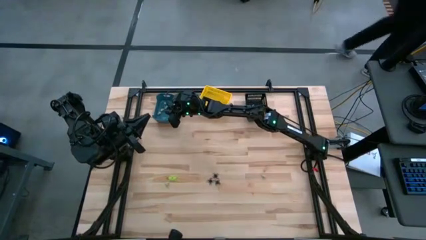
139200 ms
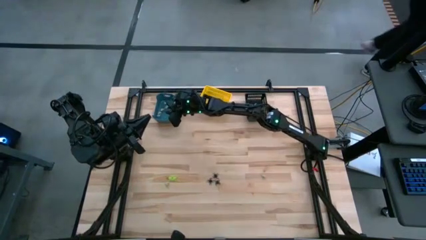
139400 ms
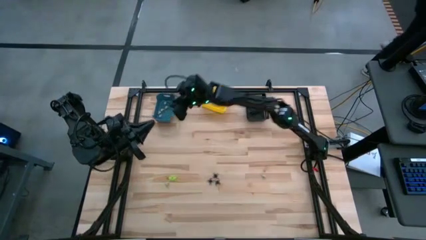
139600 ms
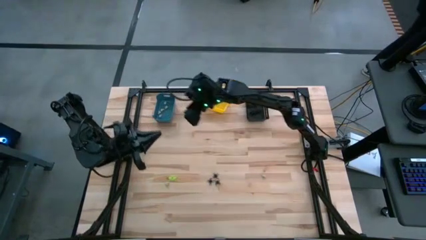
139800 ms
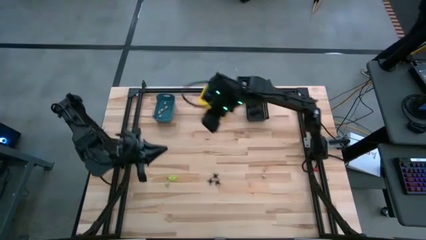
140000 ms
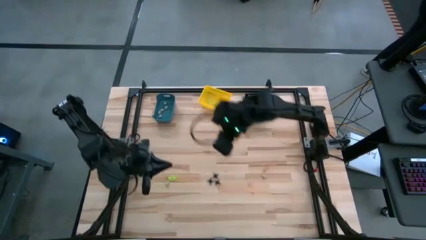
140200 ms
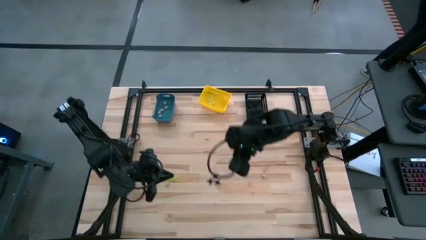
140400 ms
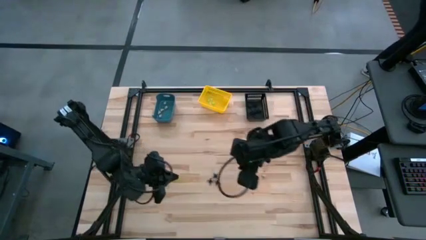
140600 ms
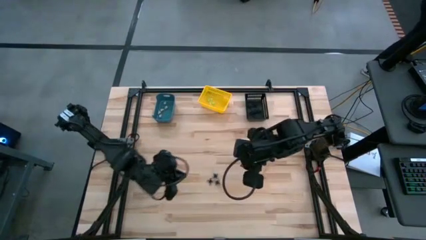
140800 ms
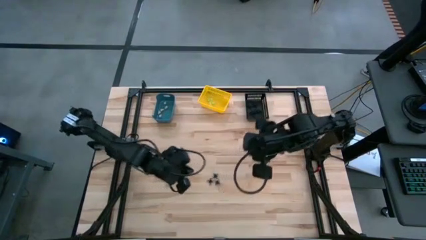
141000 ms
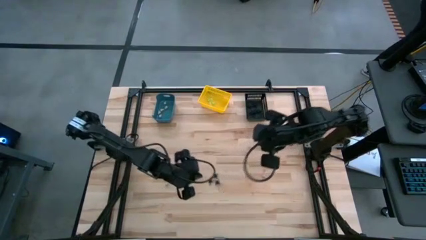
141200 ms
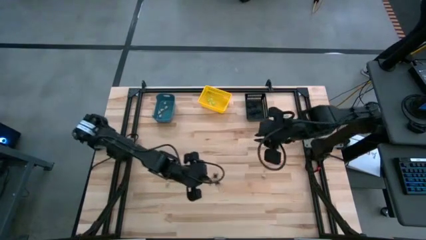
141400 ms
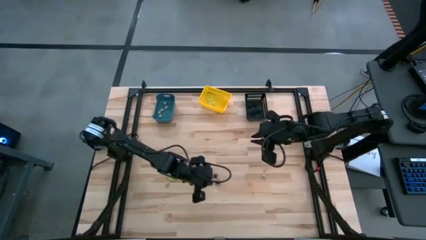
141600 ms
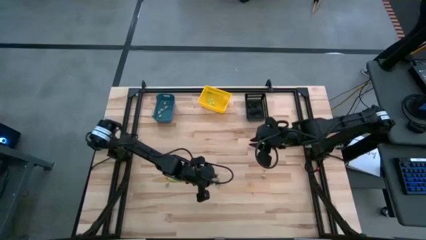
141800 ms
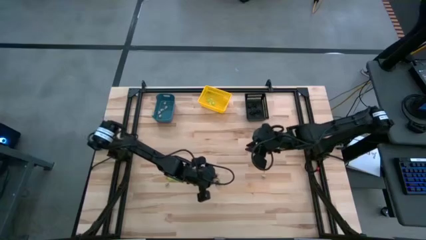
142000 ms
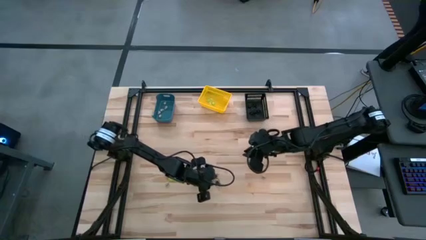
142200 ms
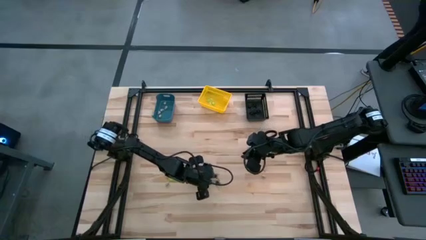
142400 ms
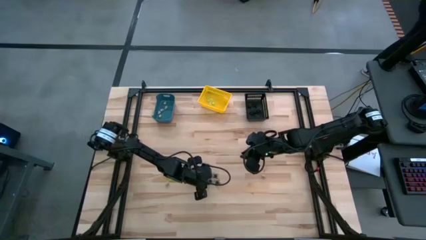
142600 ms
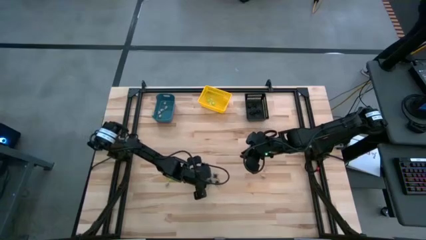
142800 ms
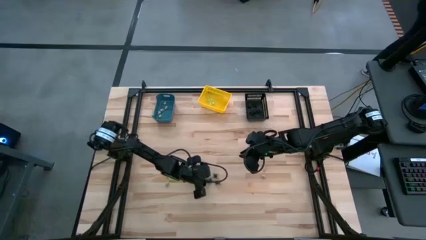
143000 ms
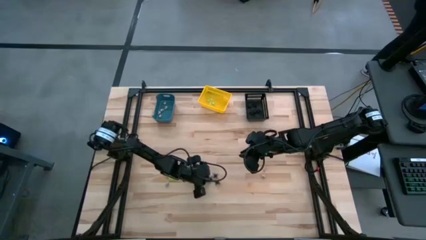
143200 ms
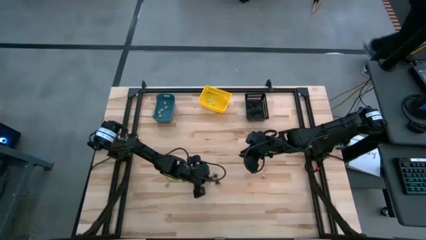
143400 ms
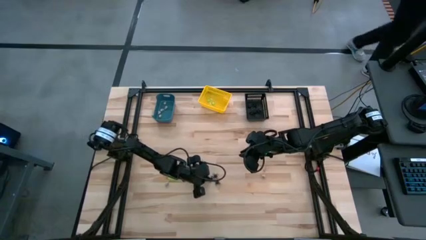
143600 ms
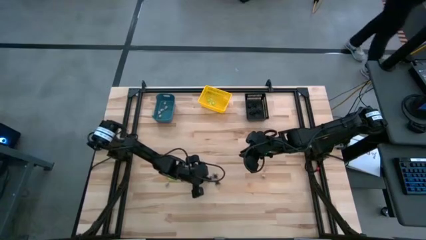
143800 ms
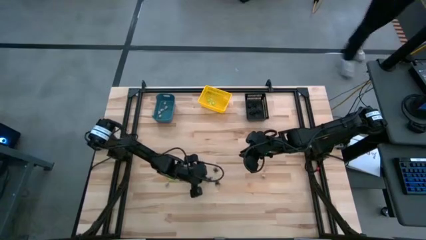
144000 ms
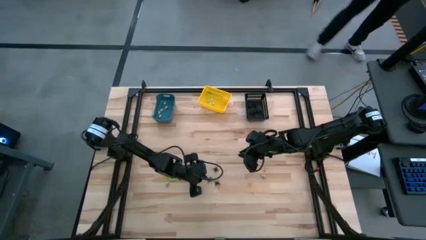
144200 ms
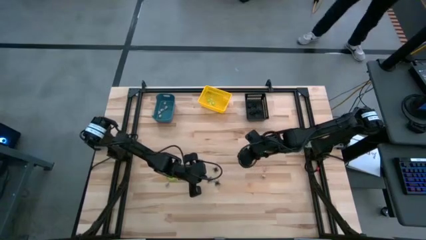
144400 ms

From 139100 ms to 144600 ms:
Task: Sort Halloween decoration
Put the black spider toy into the black bin

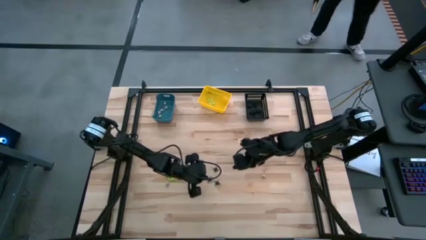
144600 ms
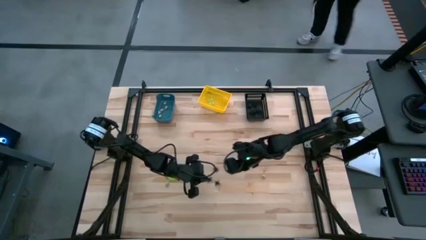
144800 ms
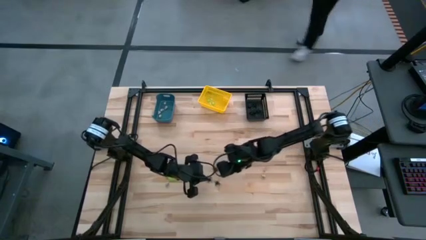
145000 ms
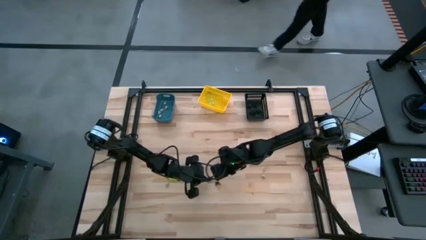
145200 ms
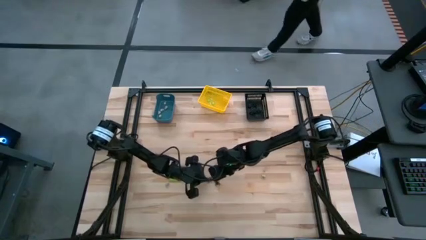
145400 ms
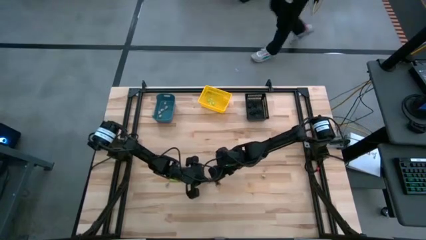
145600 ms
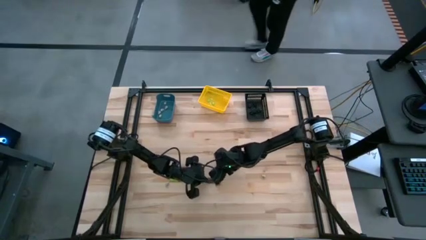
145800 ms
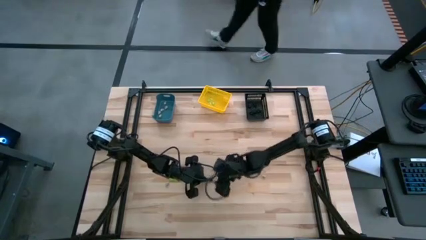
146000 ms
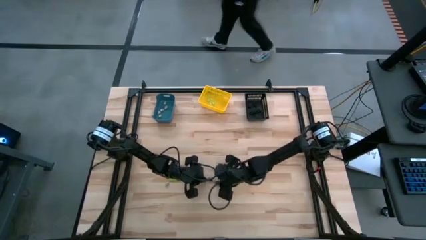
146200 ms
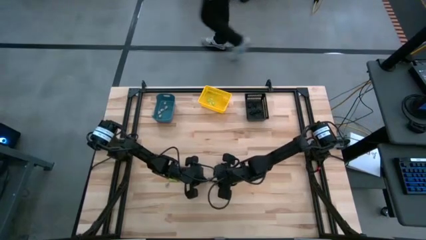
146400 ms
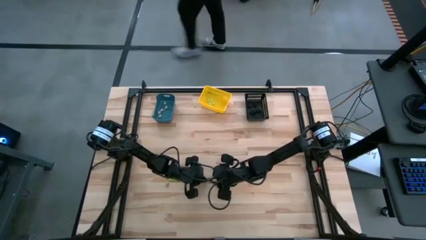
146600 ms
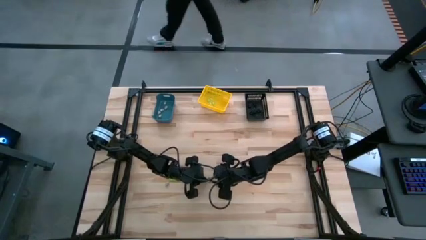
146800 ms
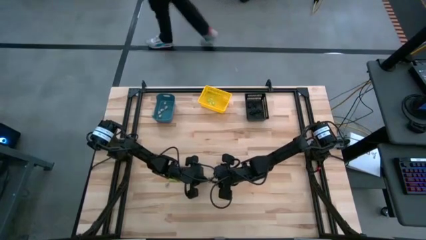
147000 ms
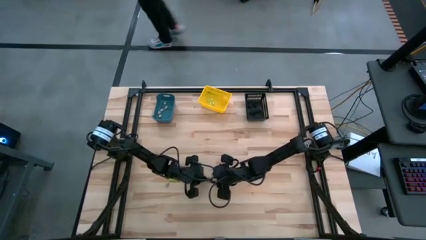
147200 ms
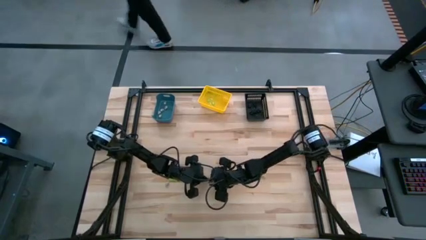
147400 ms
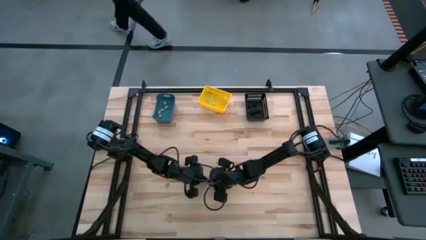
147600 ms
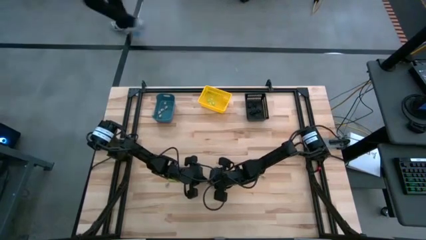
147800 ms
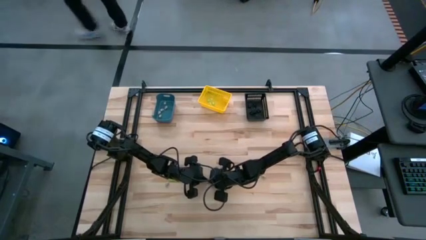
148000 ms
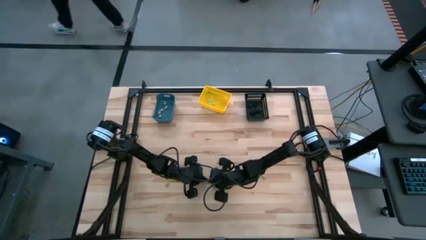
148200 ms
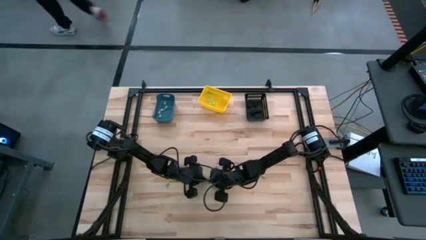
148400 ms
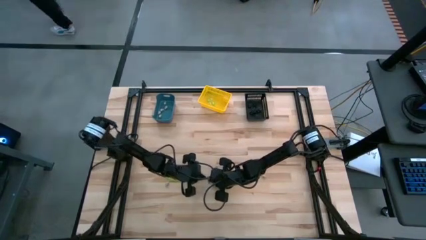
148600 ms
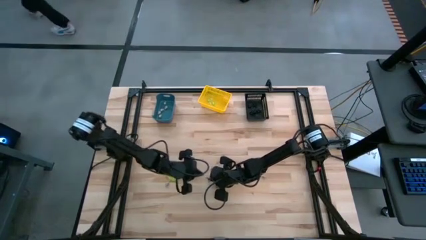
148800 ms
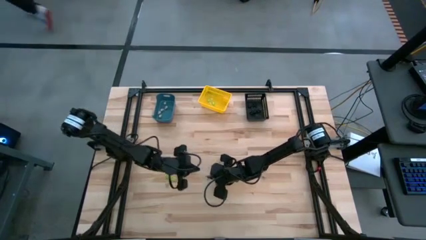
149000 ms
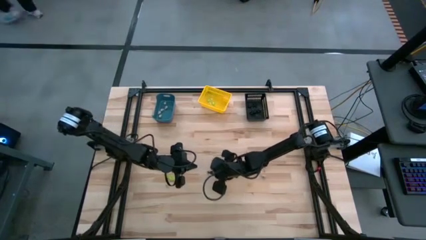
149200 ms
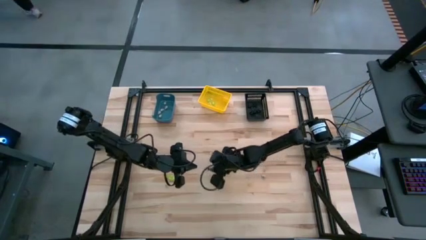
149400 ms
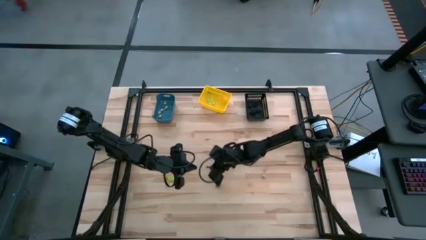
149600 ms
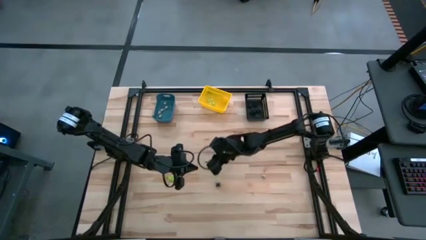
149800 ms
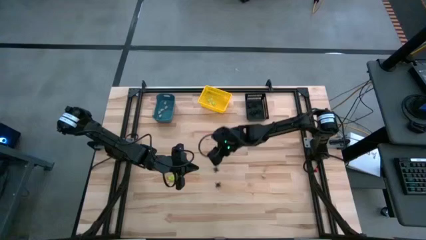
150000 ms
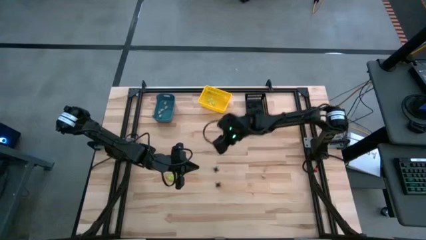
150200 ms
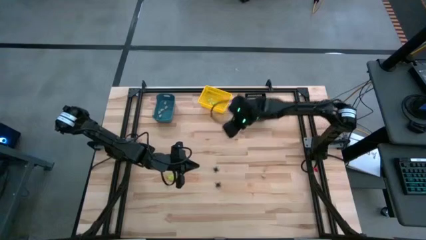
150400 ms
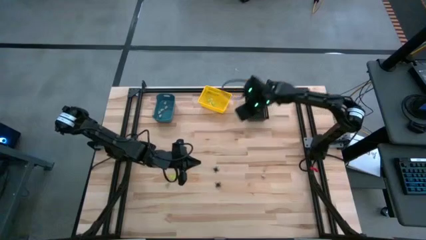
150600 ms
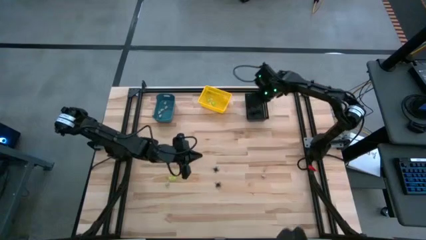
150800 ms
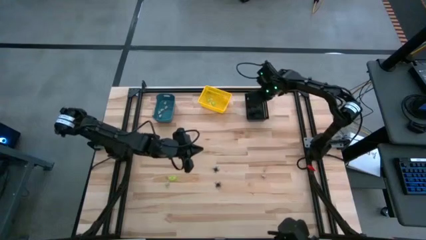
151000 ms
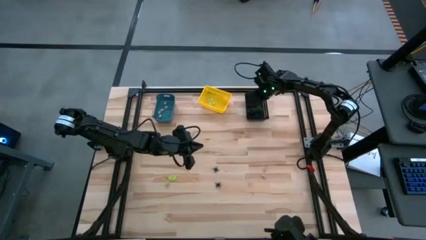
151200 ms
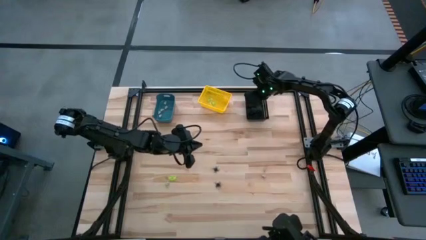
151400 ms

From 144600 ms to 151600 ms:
Put the black spider toy into the black bin

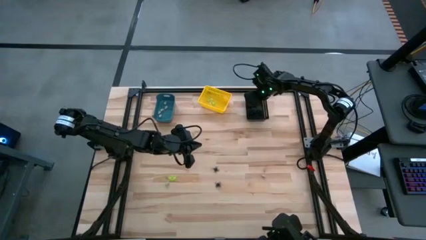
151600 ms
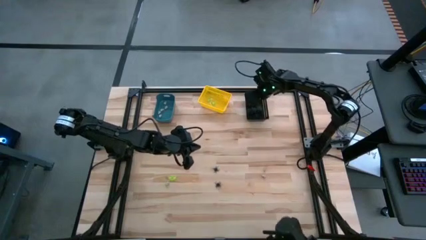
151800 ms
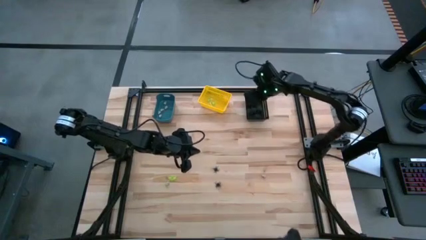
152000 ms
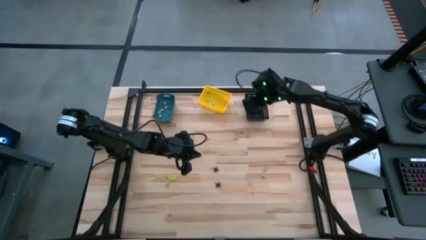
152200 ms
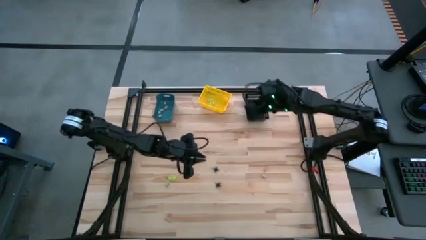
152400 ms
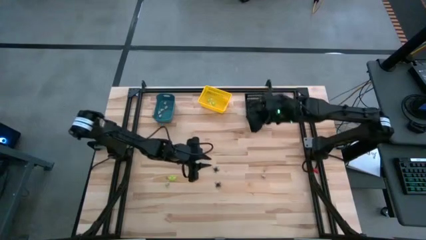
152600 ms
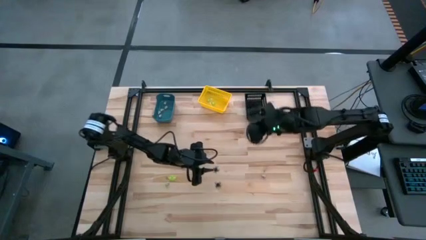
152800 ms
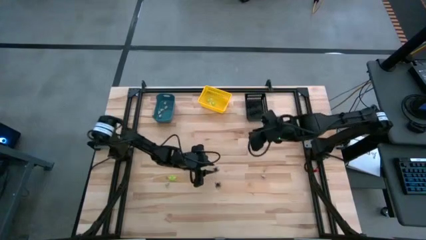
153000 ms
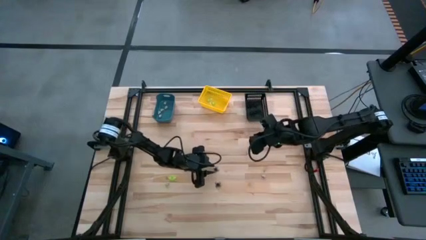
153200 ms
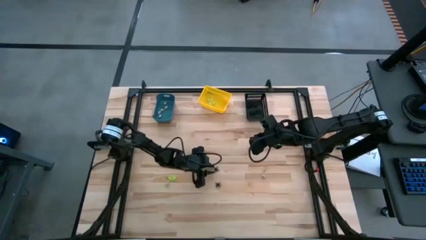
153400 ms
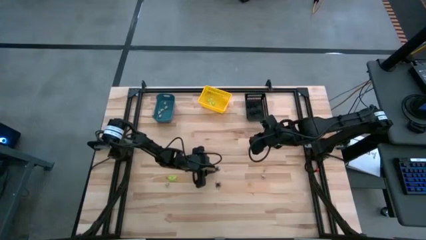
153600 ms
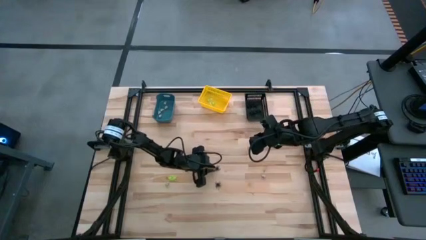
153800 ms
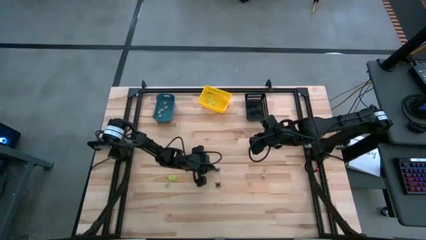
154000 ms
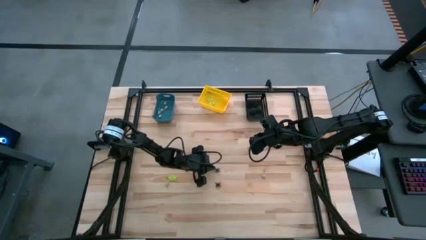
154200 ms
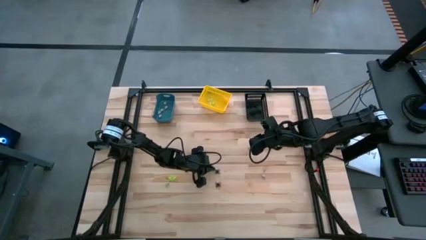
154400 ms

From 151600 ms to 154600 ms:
Put the black spider toy into the black bin

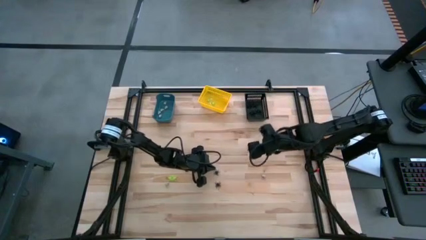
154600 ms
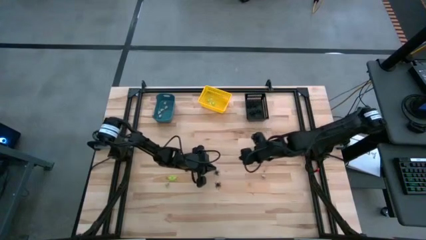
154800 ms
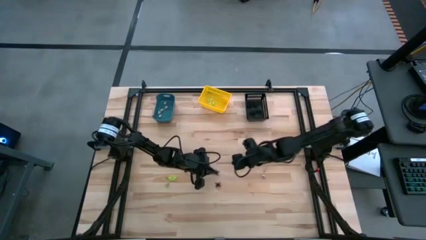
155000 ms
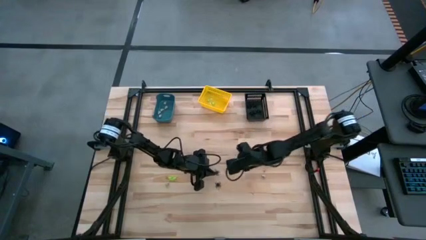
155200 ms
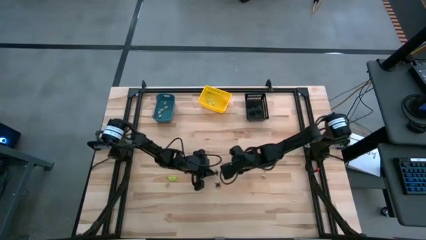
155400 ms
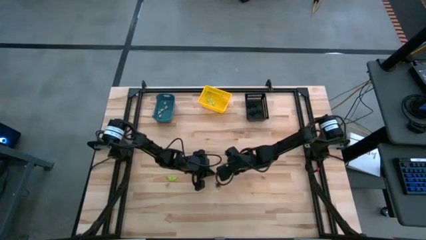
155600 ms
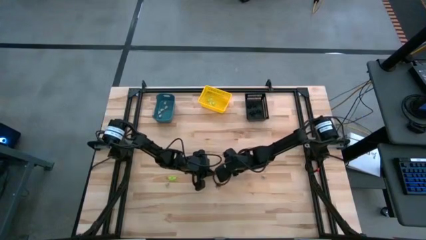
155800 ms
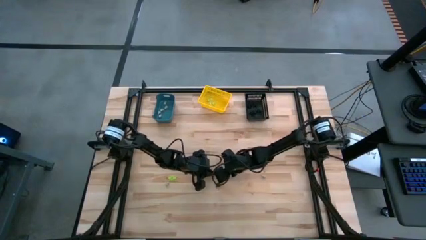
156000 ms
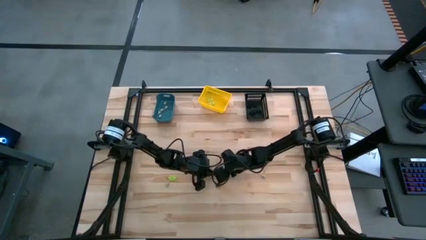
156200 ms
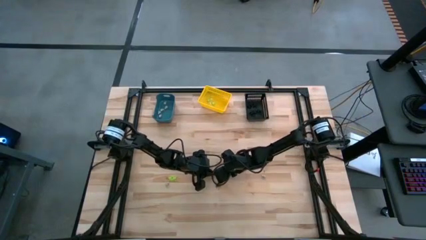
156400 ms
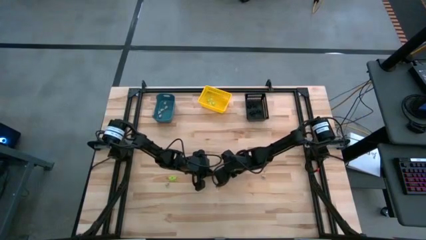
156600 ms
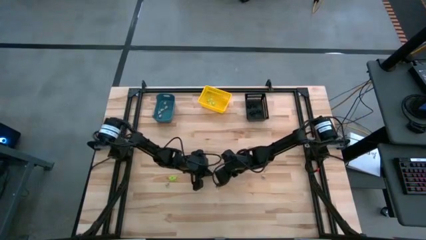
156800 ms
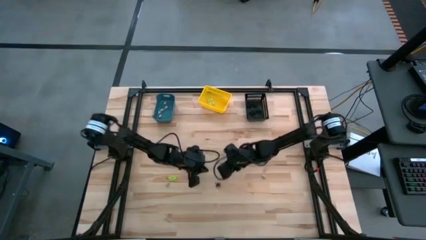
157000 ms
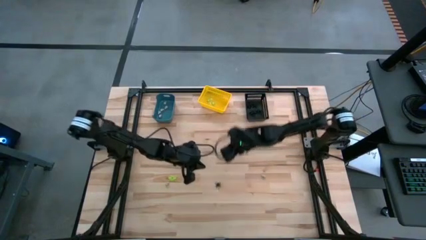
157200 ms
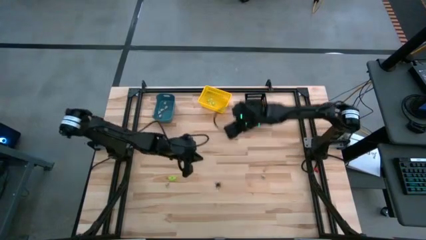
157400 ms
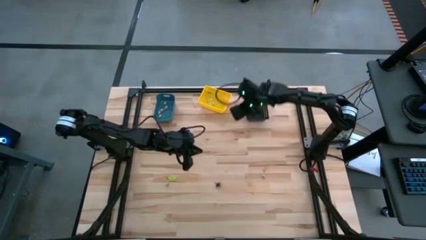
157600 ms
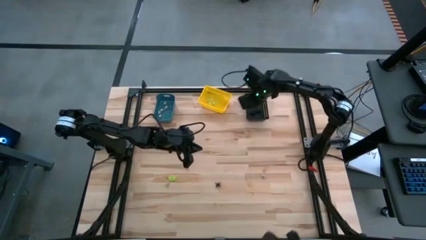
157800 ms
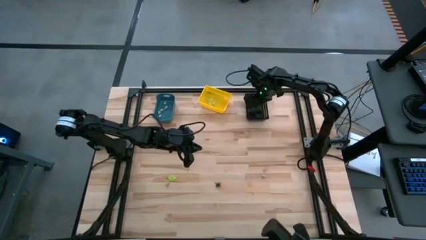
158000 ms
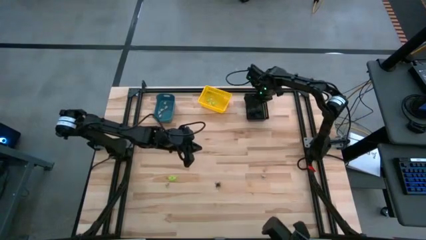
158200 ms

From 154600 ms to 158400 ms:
Put the black spider toy into the black bin
